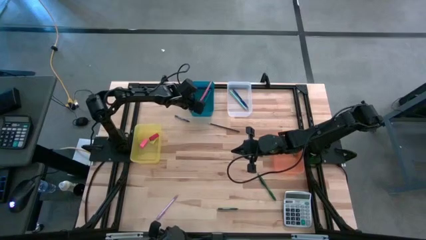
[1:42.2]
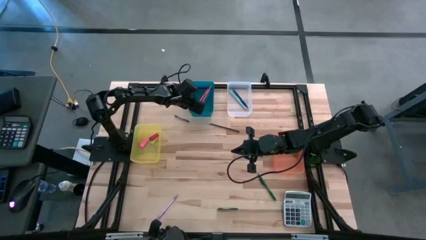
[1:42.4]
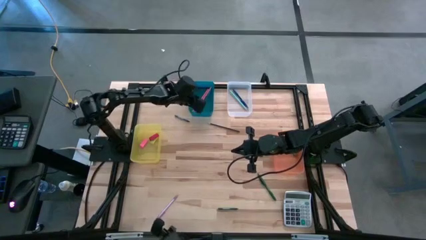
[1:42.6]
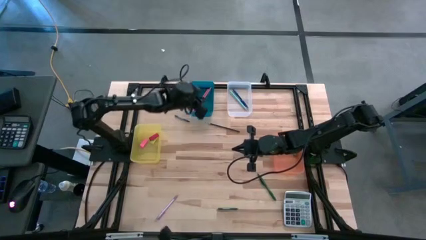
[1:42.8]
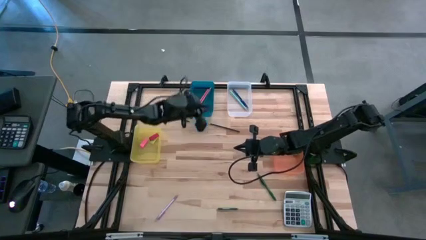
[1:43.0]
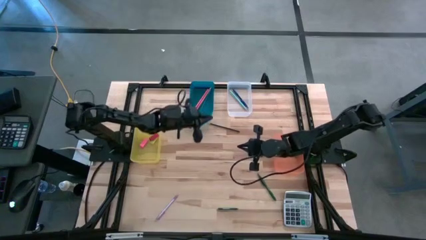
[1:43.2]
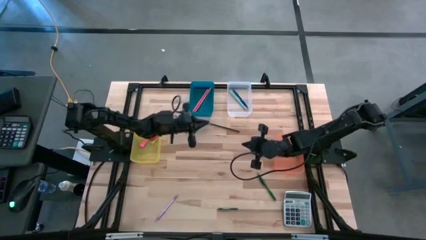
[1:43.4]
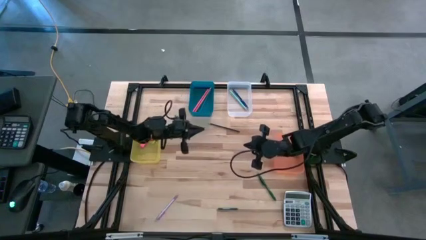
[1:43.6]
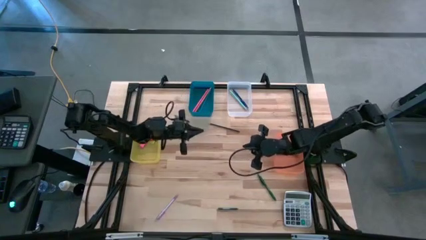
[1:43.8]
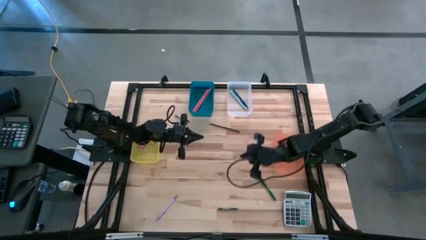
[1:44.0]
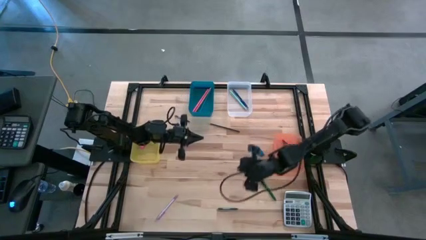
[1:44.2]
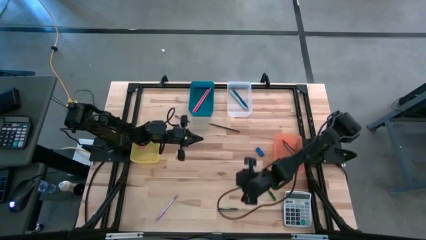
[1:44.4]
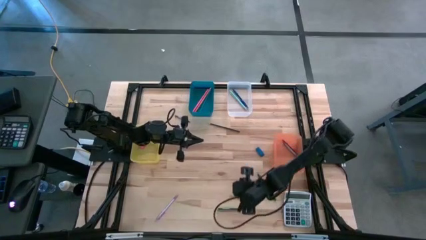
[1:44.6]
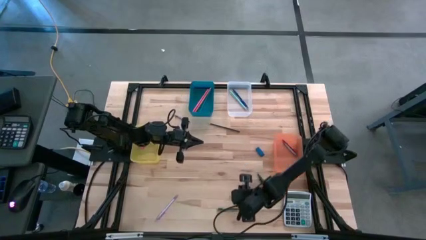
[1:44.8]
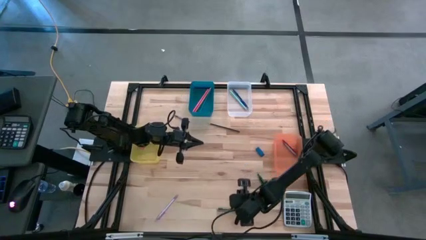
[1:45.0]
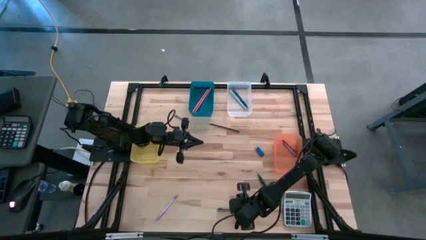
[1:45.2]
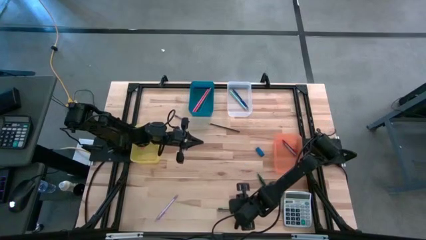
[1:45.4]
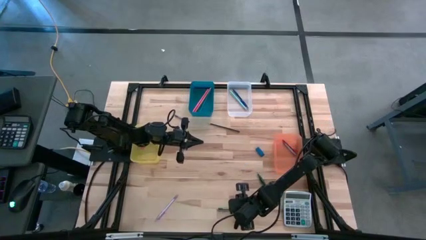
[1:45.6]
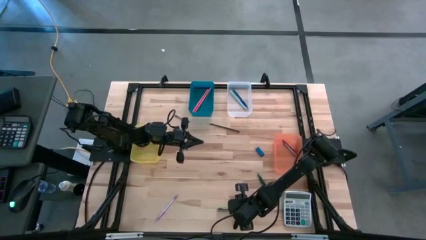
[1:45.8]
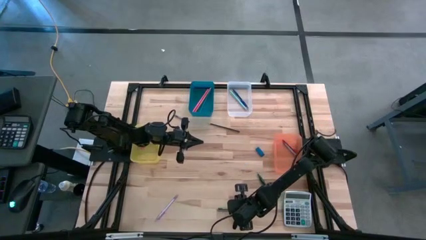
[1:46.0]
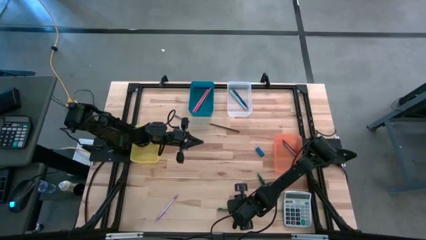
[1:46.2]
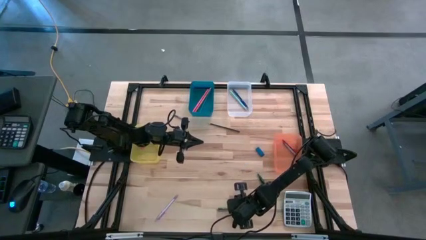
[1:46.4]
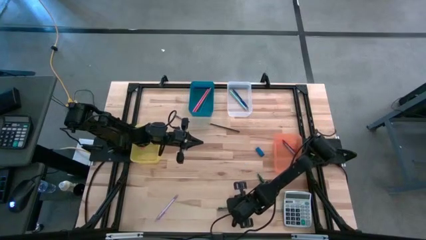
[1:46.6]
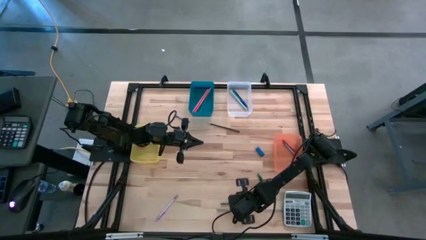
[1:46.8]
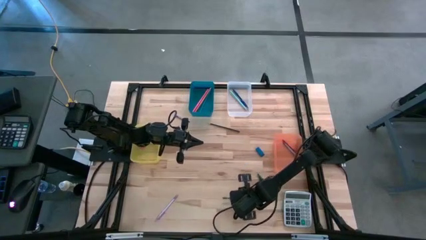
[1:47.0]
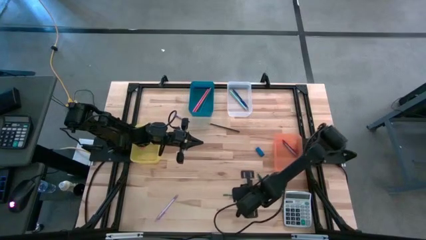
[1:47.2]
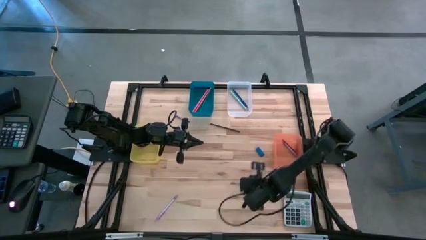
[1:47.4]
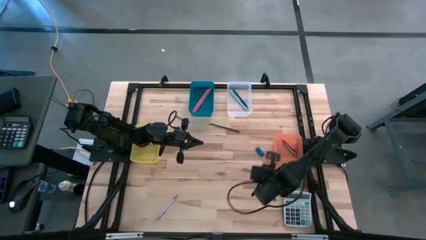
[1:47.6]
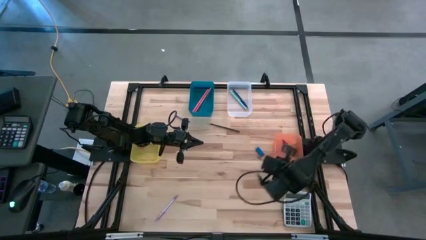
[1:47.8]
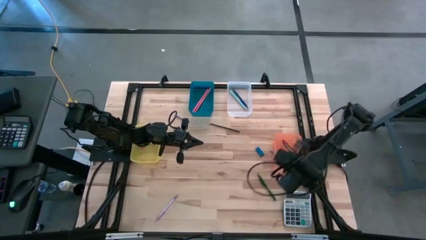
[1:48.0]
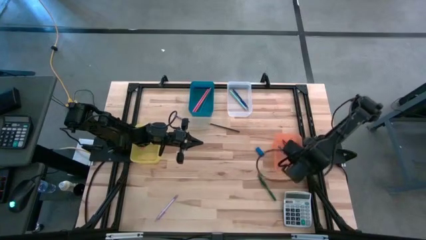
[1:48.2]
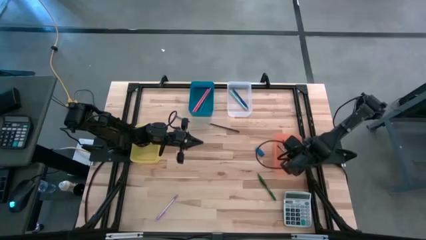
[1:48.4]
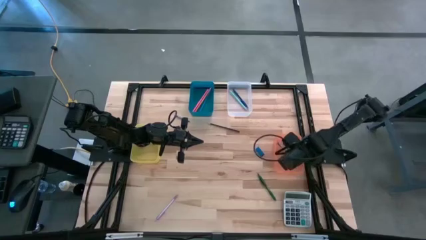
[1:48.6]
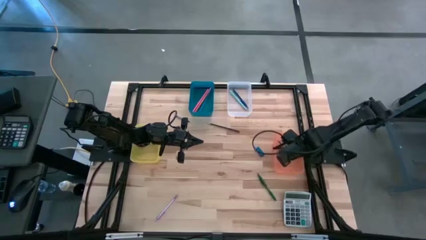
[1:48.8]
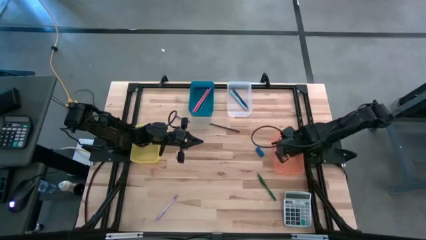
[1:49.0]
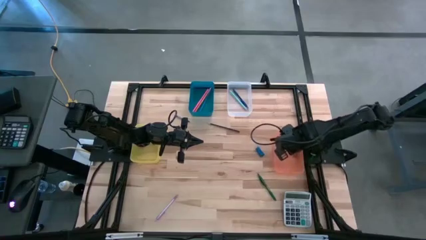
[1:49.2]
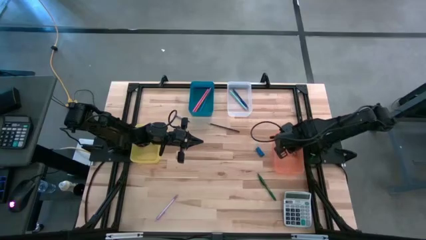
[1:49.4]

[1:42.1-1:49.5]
Task: Sort crayons/erasers/pens/pencils in bins
Put the green crayon into the orange bin

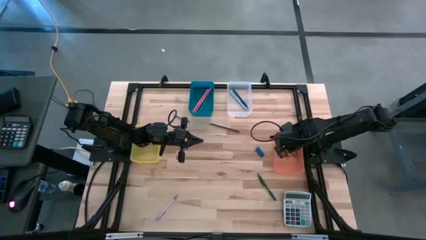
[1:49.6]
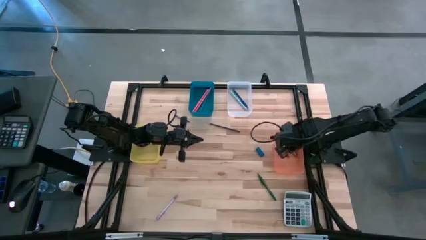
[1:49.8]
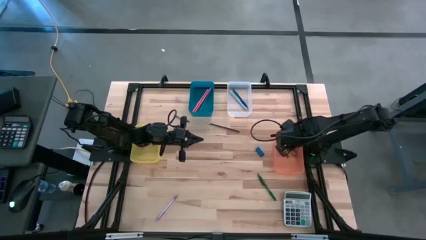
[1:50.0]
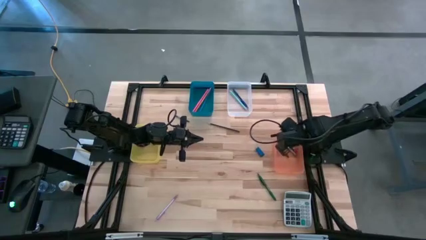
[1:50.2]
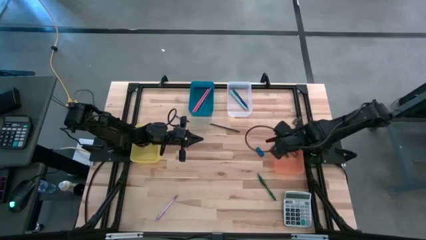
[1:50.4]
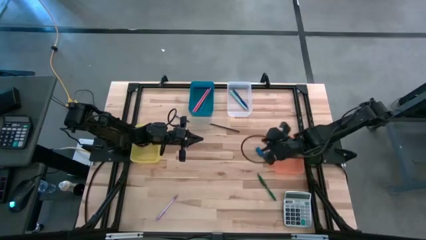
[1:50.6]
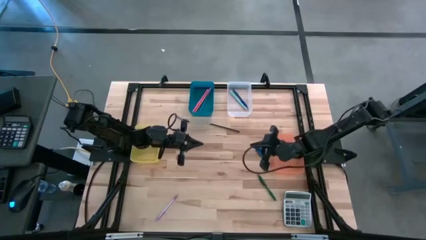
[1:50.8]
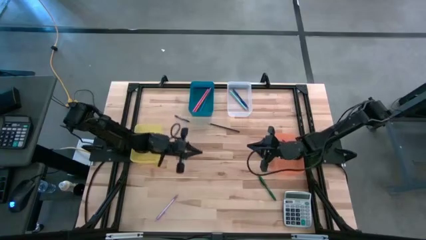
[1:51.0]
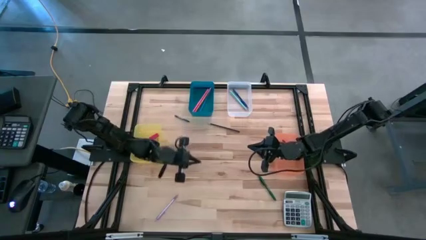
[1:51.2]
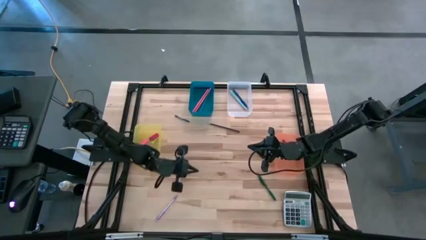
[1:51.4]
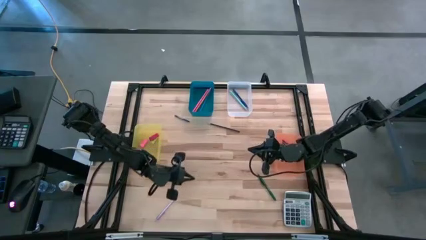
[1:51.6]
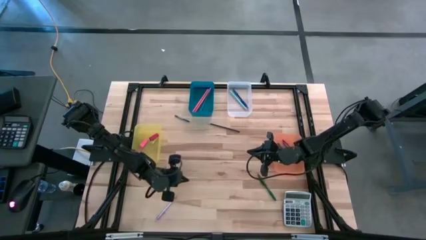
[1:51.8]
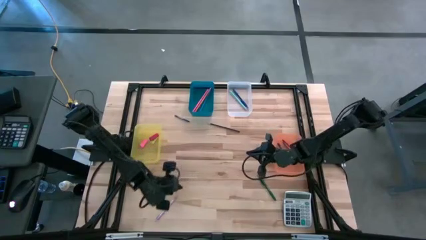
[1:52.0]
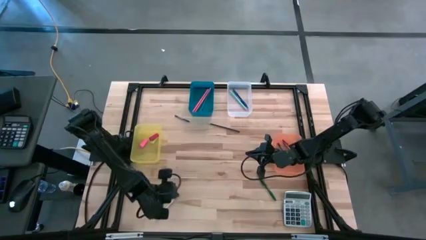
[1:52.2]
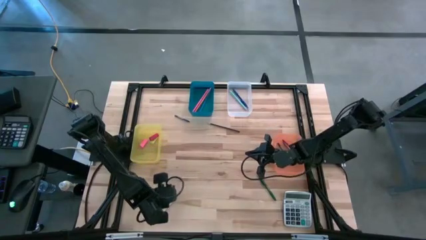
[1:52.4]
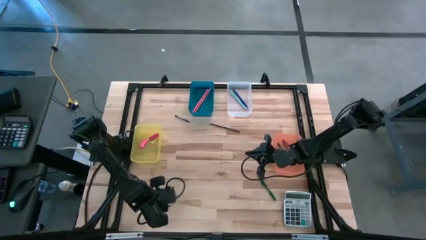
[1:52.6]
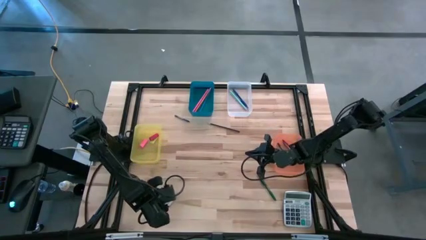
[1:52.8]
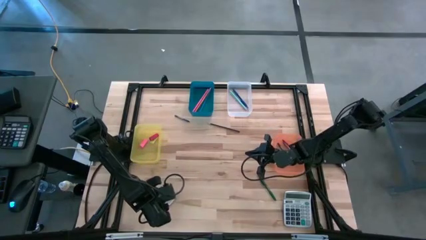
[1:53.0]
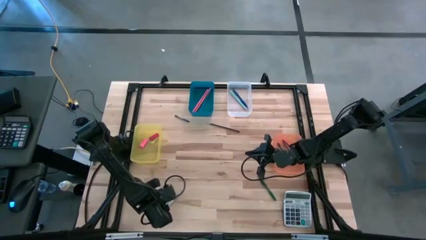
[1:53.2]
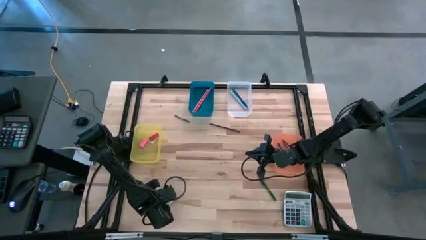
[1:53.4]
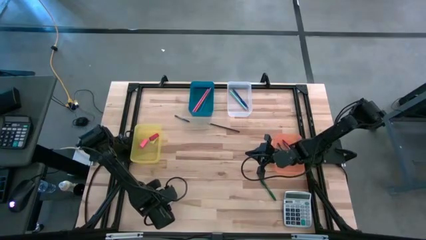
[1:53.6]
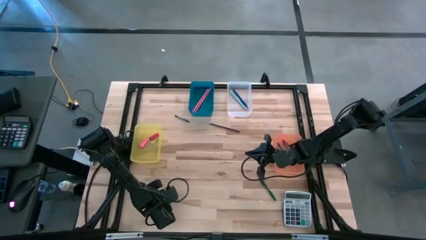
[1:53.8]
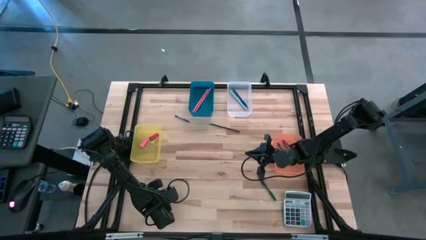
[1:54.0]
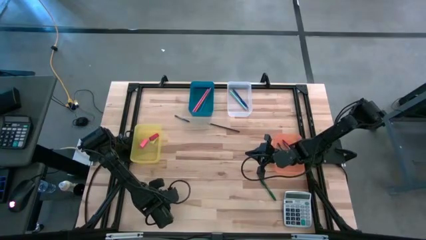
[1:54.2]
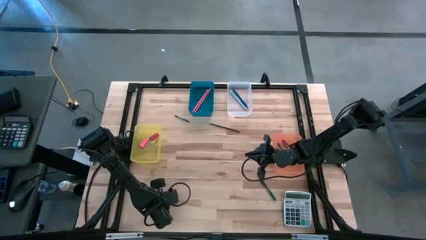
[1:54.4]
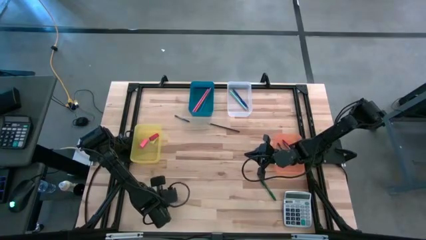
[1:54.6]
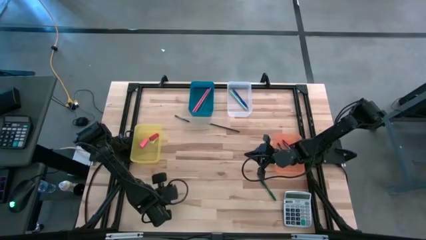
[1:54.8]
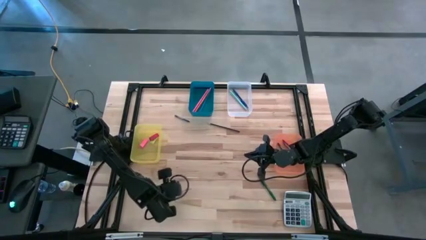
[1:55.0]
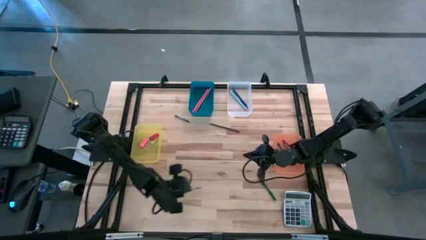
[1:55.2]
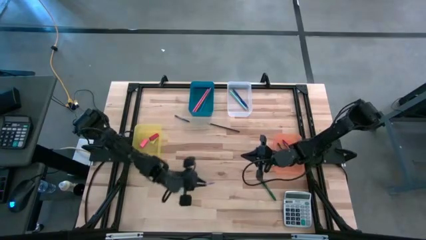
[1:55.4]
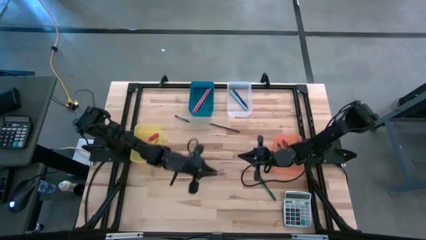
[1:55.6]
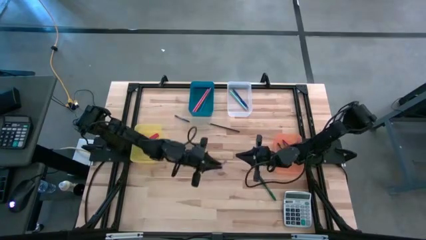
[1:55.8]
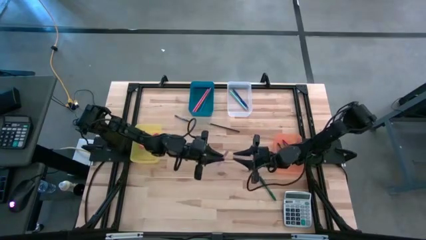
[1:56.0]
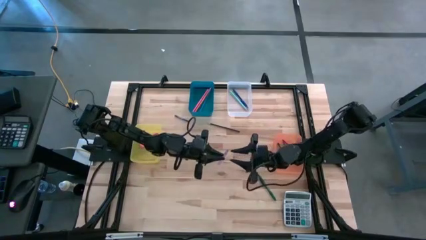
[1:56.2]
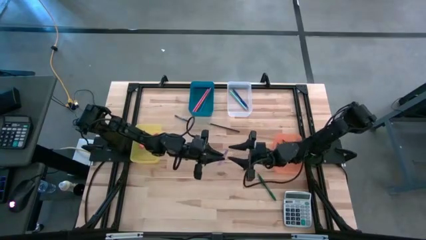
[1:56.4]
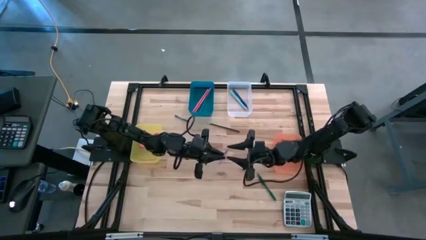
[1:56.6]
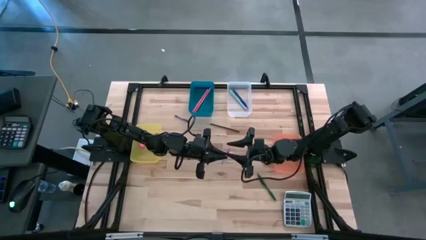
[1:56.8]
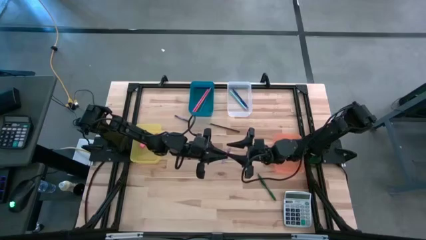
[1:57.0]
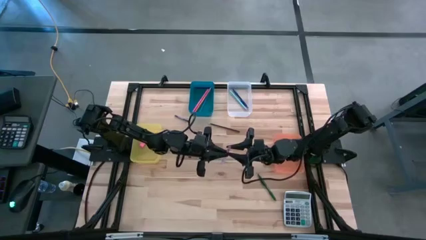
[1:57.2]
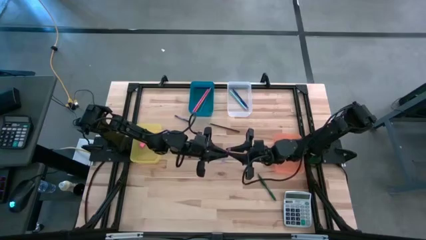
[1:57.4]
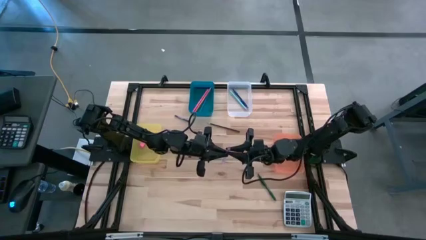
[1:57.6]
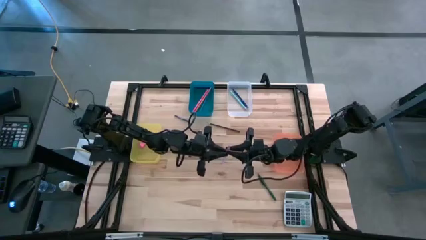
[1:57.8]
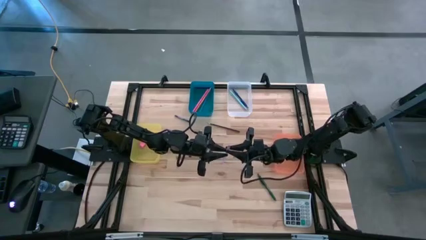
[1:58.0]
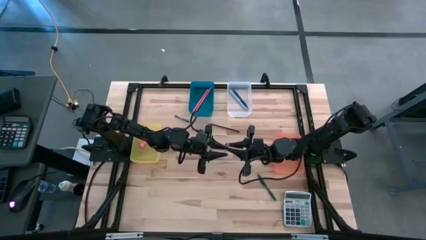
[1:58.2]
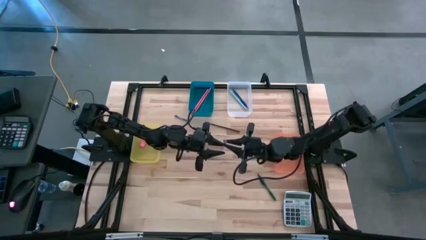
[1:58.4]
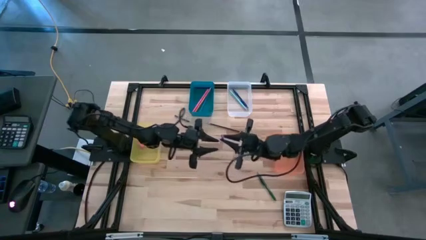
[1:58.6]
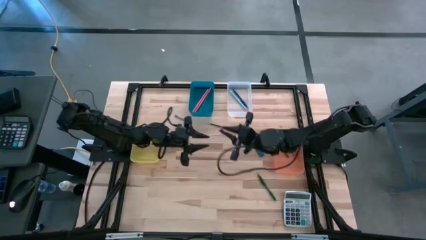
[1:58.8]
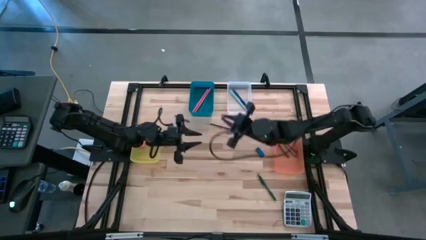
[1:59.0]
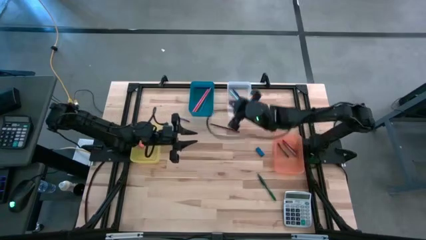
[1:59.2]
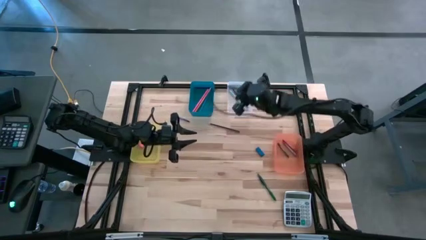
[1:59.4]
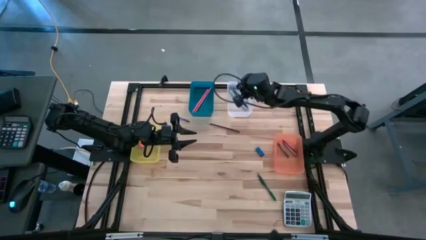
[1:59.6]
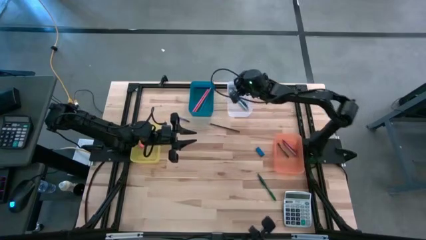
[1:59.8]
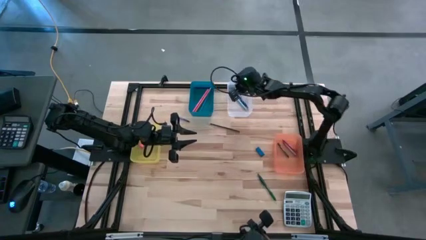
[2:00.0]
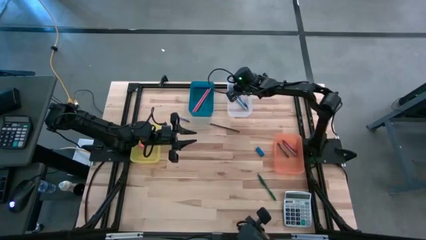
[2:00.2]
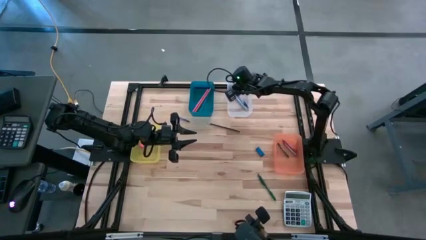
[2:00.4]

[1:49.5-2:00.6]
Put the purple ballpen into the bin
